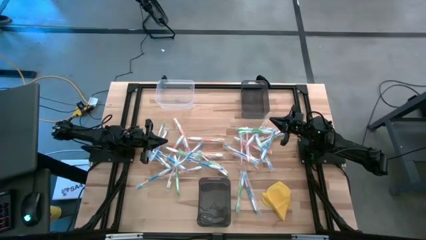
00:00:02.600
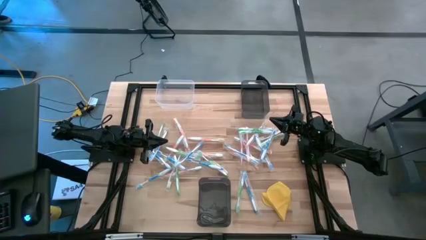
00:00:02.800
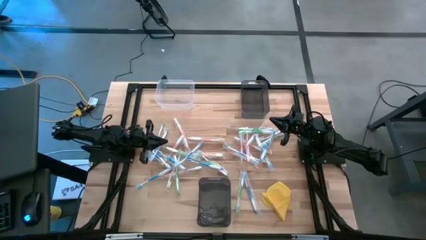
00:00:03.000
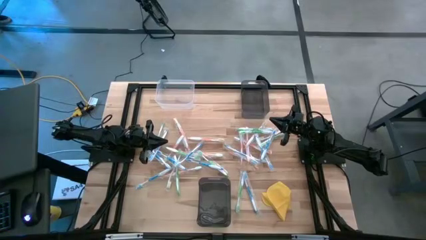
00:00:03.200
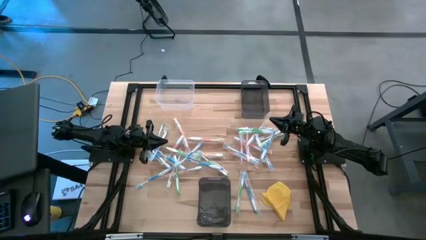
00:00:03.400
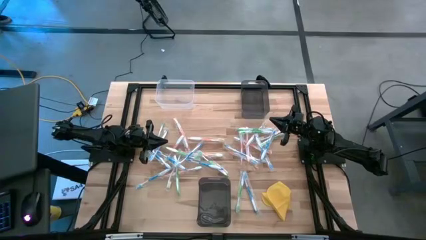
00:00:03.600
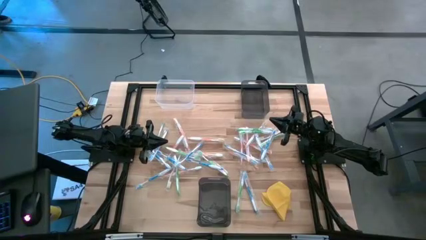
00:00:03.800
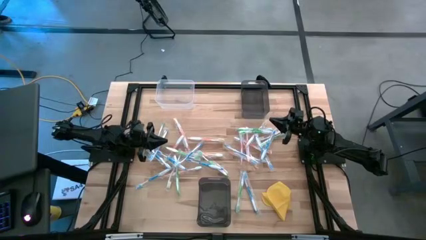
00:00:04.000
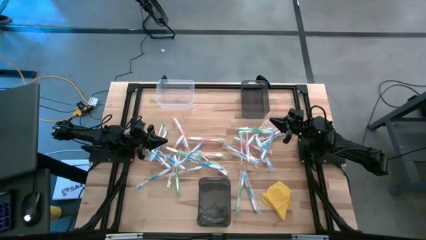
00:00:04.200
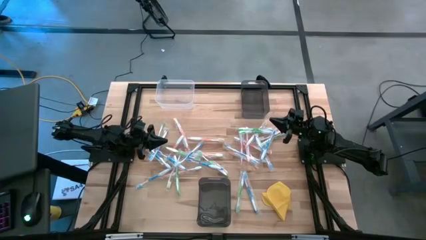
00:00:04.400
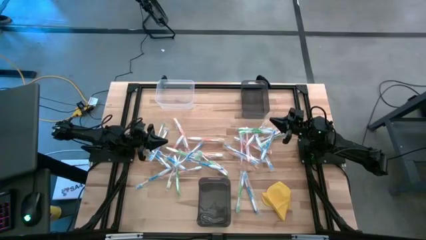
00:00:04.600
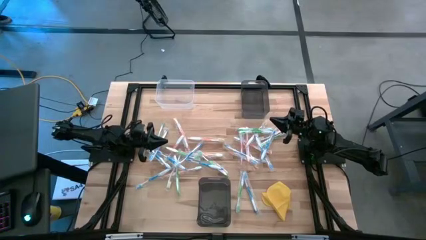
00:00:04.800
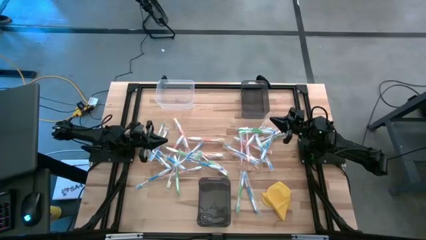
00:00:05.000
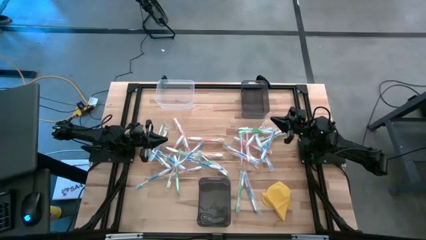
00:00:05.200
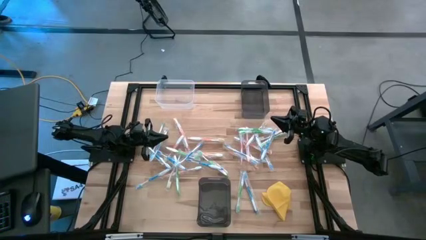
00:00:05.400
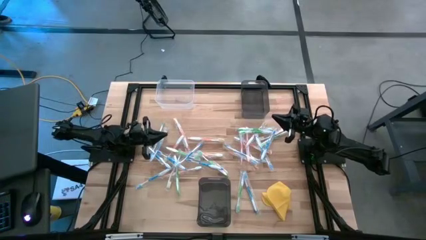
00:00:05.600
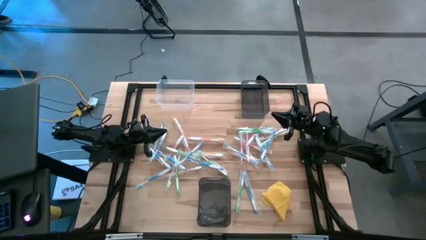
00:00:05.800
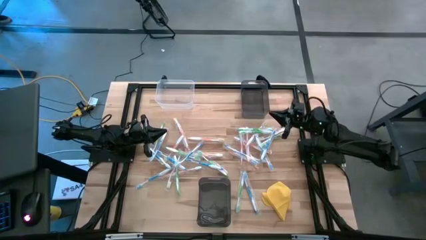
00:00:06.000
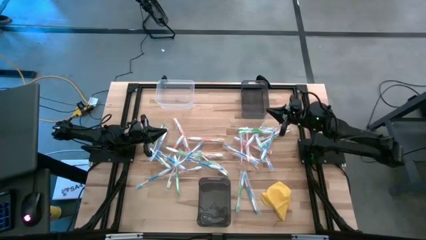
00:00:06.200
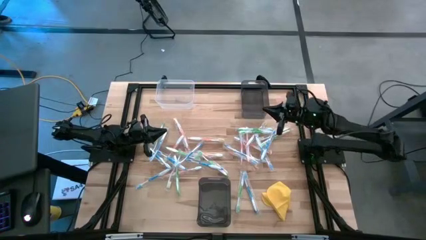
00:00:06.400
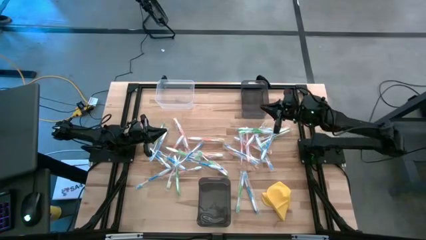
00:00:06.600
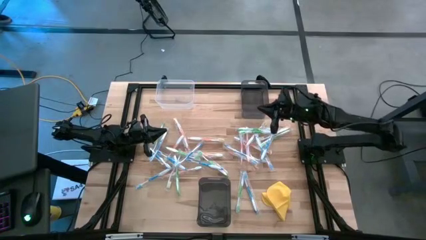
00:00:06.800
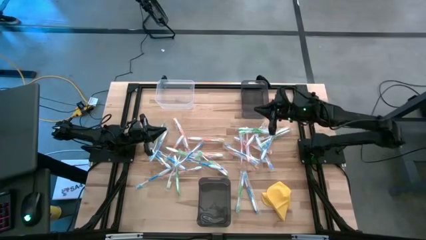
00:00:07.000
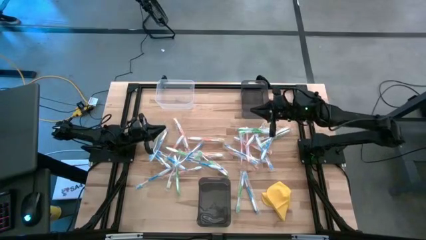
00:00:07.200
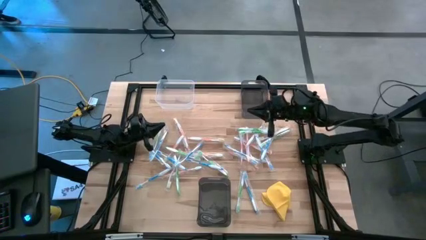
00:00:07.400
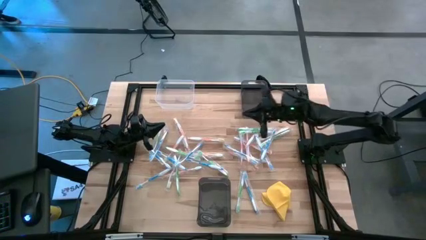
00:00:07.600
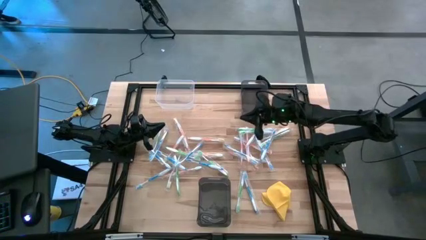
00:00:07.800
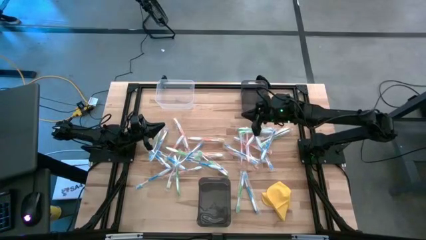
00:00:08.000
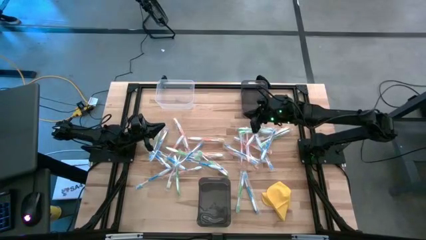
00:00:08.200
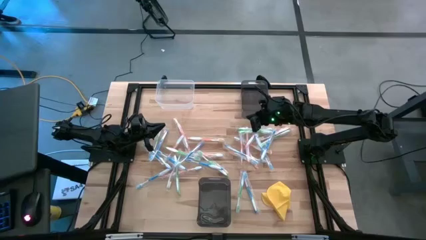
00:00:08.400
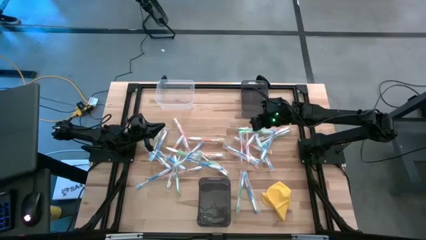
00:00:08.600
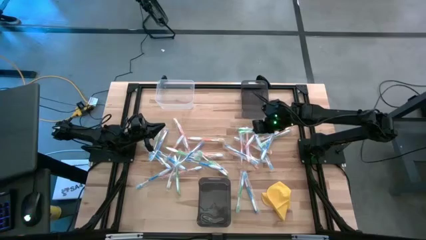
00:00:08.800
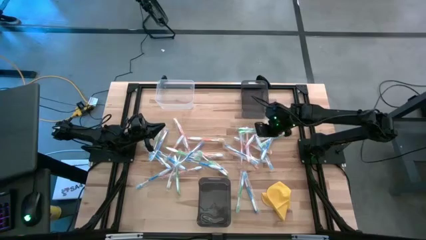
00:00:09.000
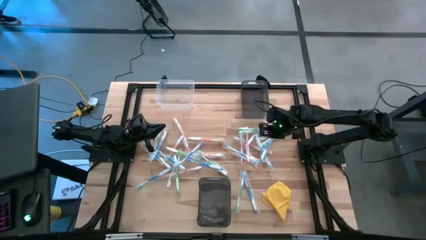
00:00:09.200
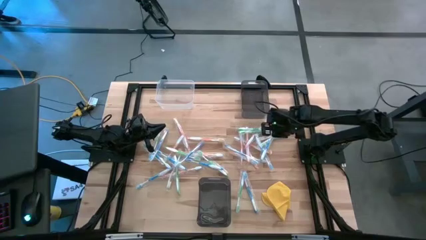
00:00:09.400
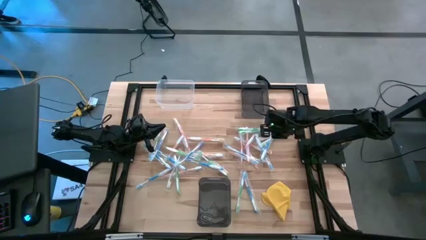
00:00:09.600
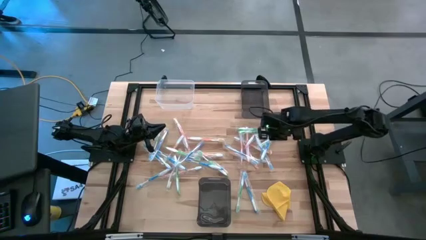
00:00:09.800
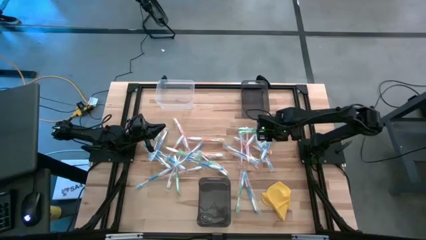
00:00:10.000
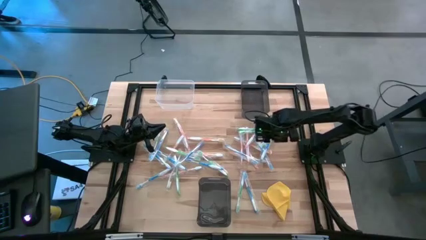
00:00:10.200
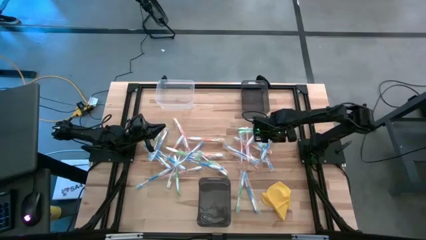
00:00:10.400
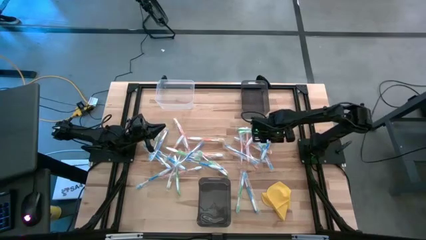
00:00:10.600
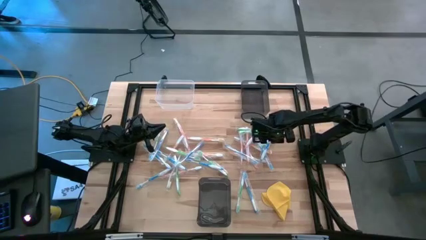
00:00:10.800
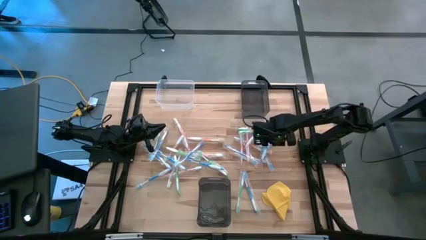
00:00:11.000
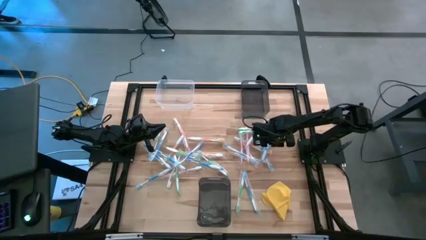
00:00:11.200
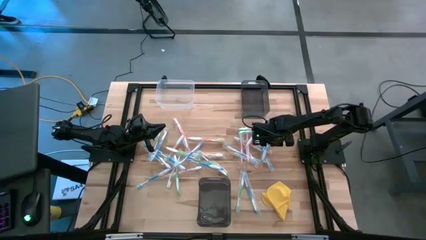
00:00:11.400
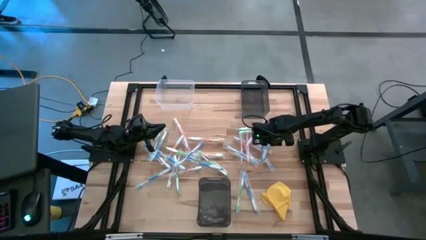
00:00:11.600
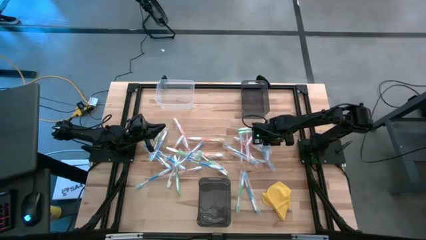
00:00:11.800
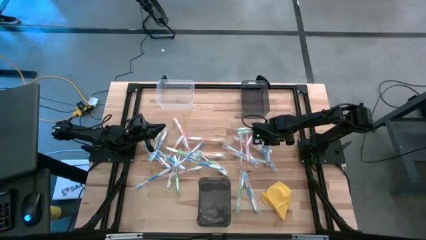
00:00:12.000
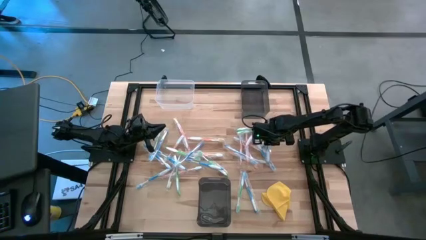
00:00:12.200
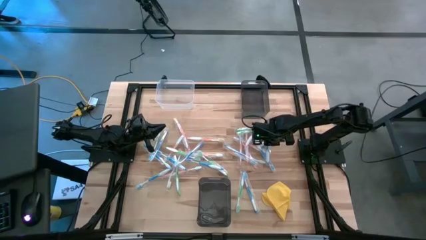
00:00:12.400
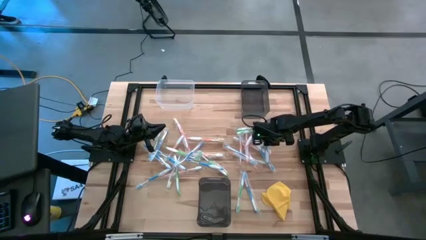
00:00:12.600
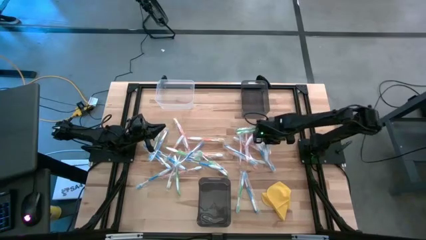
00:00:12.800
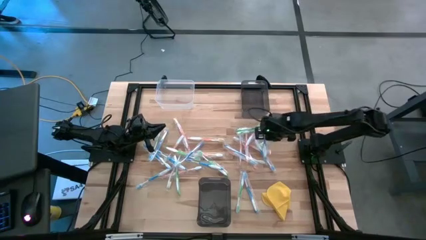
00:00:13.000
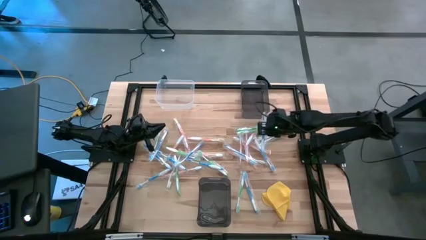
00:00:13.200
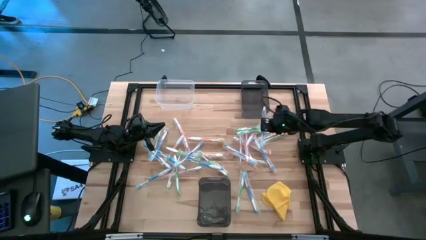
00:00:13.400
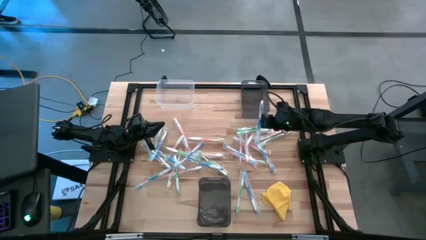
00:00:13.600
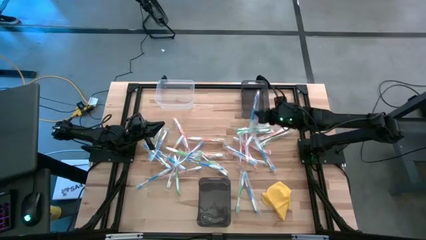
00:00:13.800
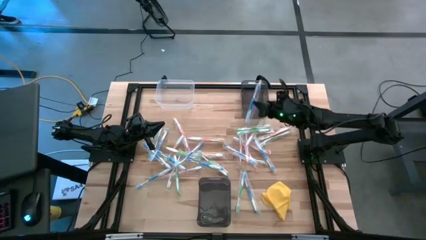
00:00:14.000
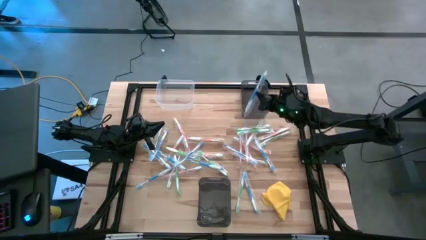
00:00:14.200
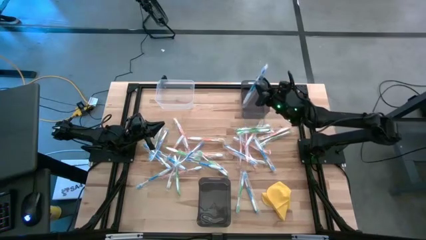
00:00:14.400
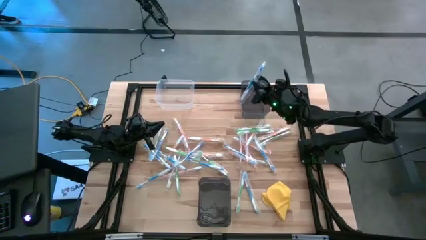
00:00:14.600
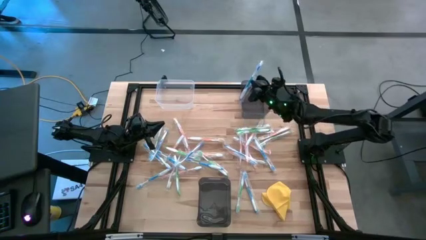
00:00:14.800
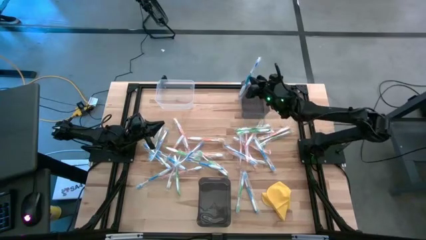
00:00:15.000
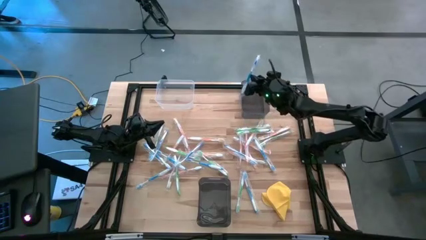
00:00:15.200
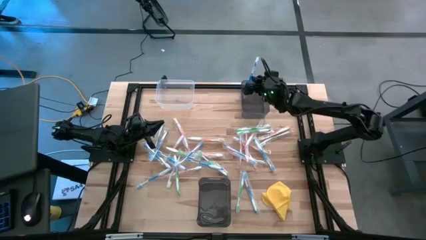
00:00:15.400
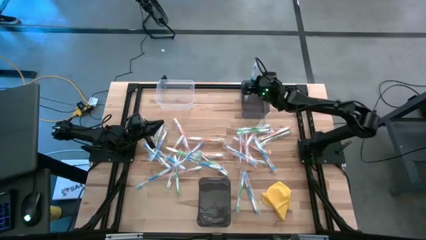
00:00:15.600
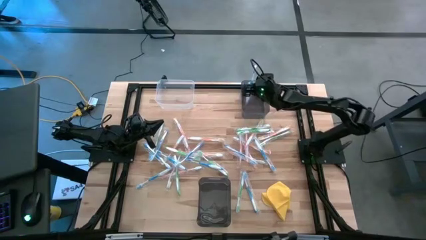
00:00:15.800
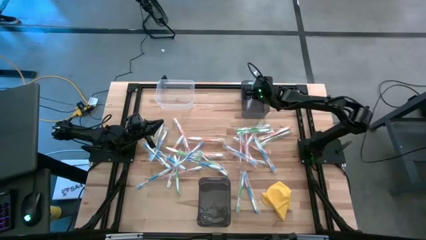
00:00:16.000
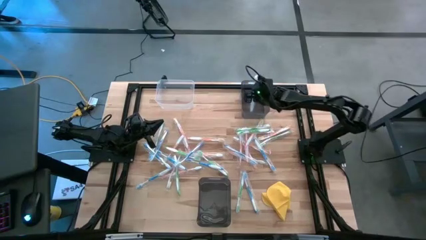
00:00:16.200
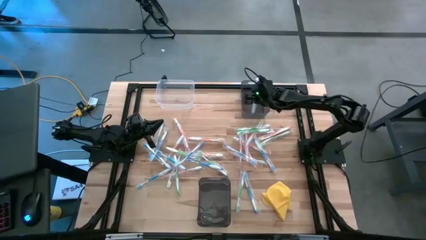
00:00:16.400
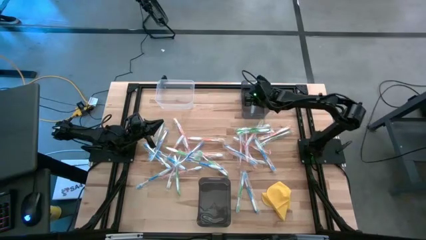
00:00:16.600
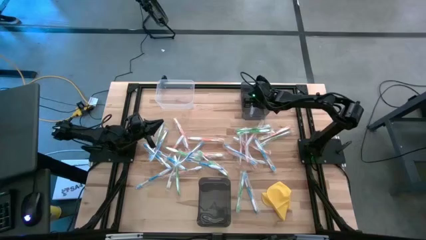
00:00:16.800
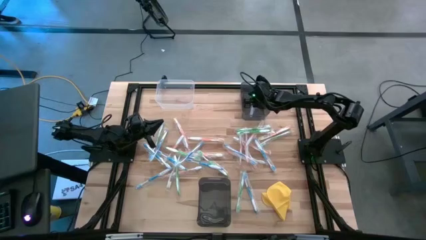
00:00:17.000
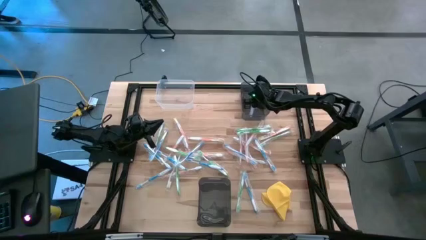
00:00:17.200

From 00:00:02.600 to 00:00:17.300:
Task: Pick & Place Toothbrushes
Put the blue toothbrush into the top black bin
